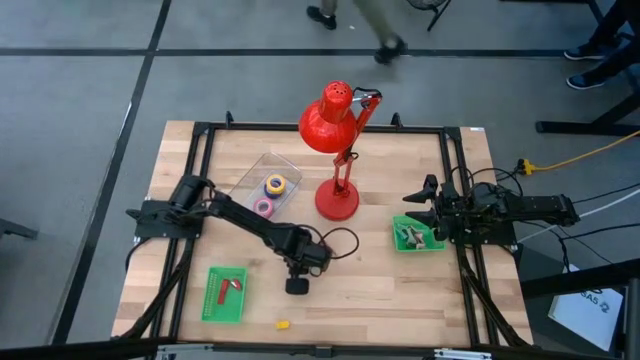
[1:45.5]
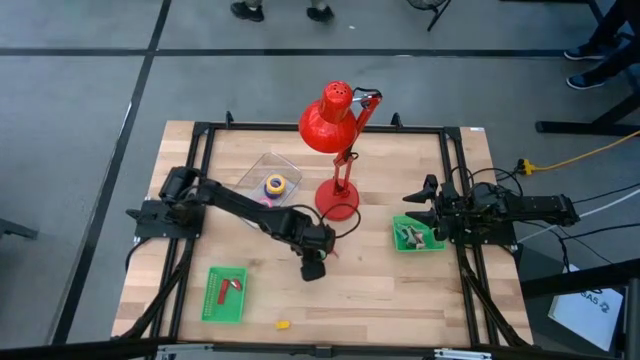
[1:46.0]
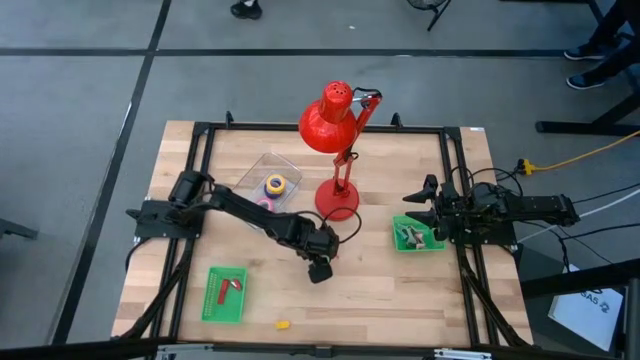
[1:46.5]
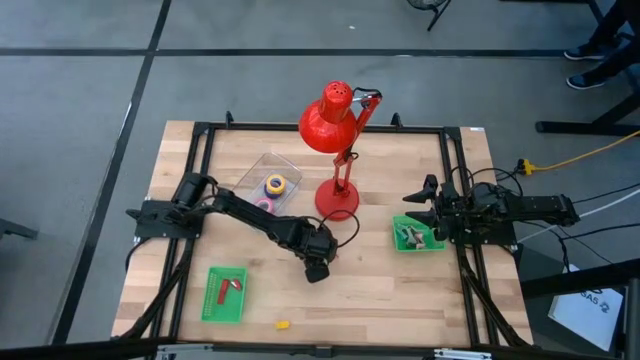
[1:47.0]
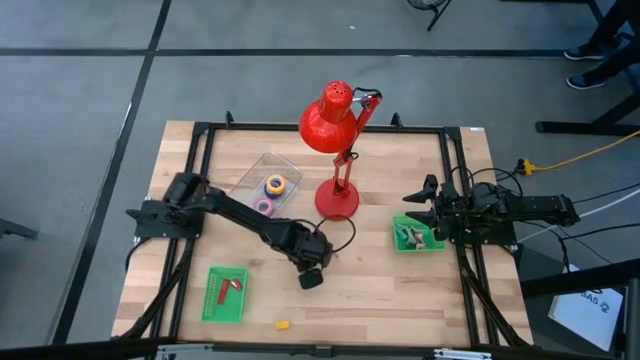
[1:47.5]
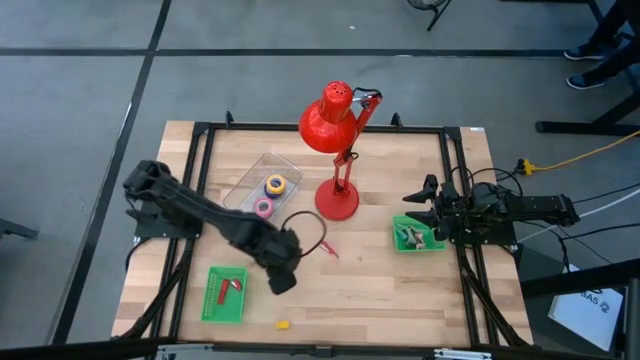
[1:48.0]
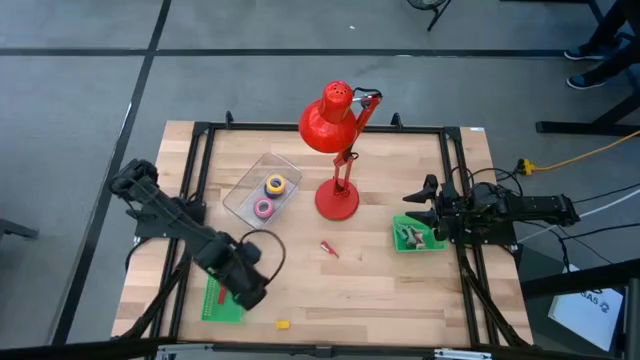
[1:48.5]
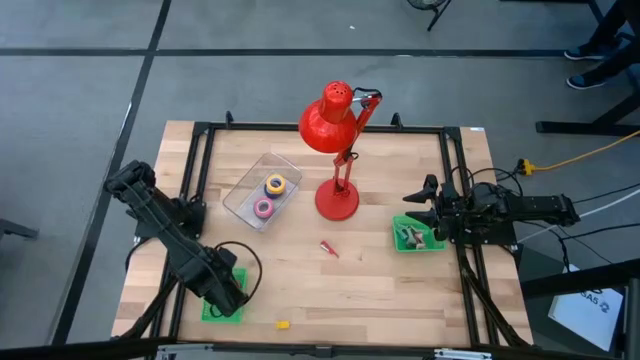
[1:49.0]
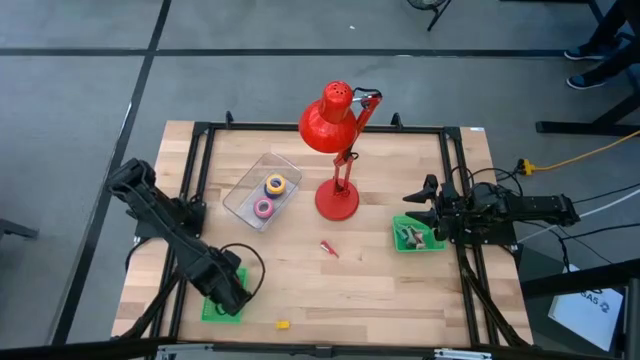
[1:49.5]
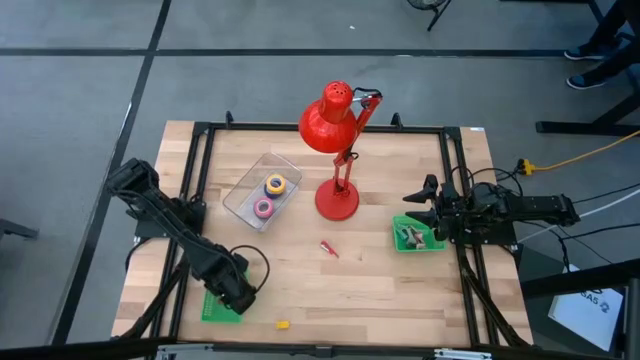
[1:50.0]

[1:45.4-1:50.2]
Task: Pick and place Stapler, Stapler remover, tape
Put the green stapler into the bottom green basket

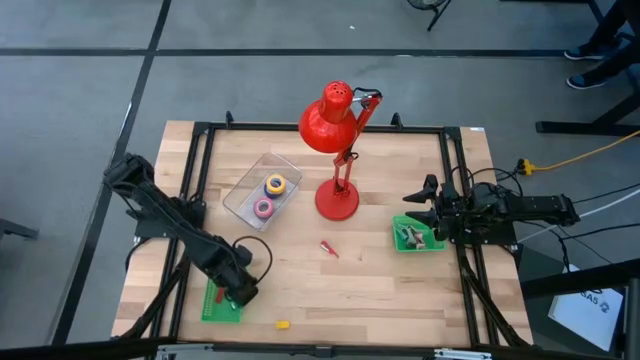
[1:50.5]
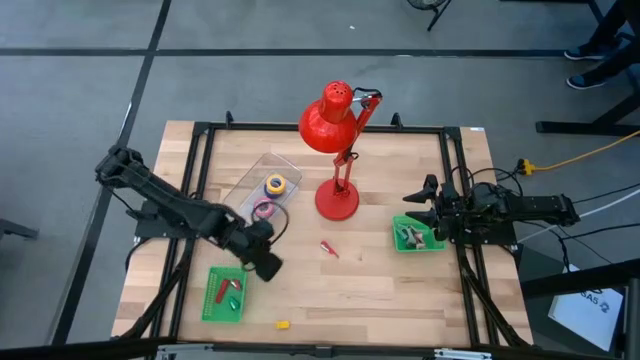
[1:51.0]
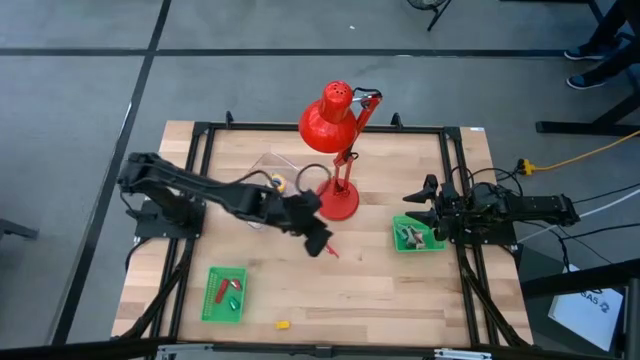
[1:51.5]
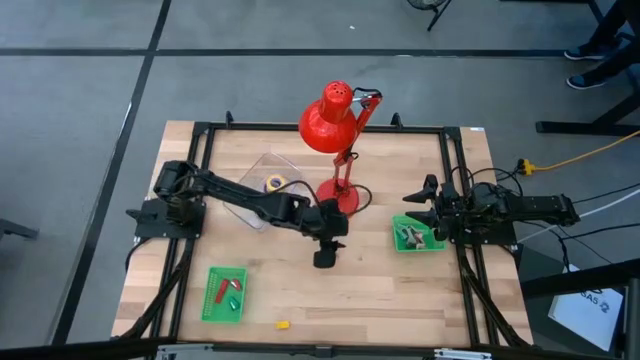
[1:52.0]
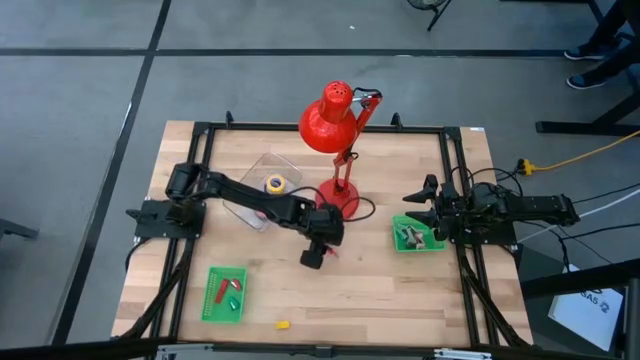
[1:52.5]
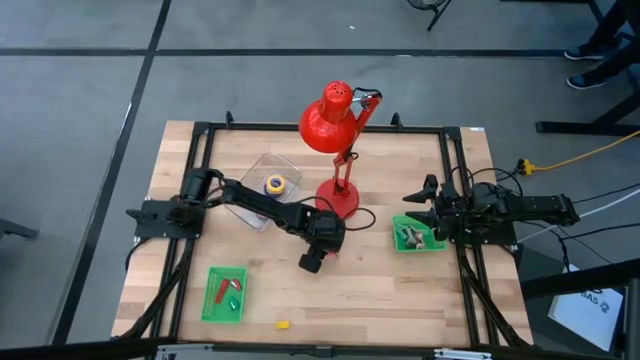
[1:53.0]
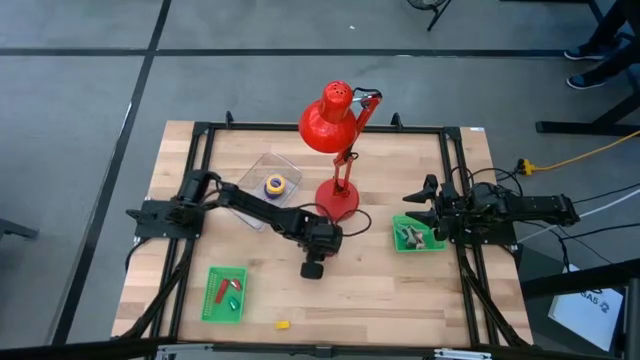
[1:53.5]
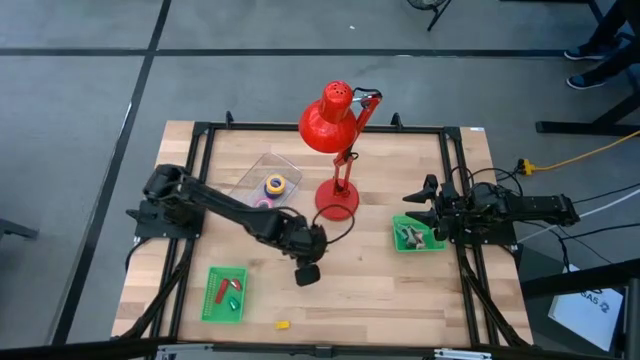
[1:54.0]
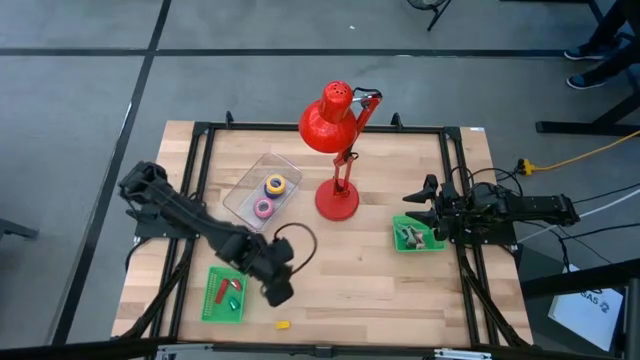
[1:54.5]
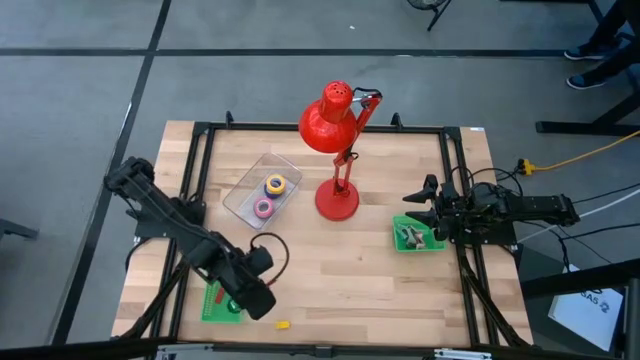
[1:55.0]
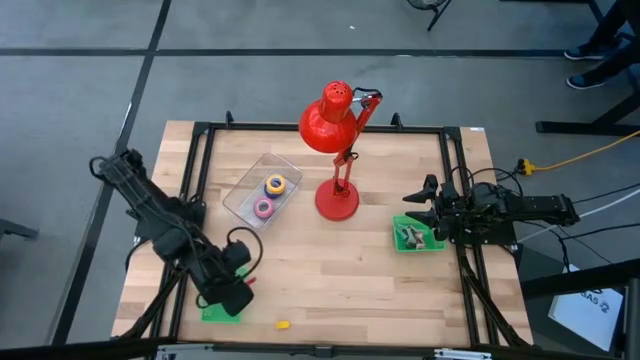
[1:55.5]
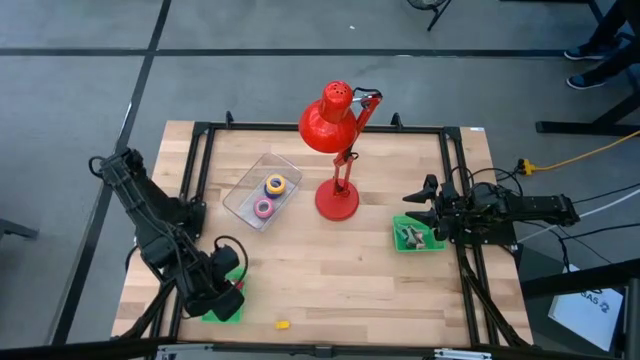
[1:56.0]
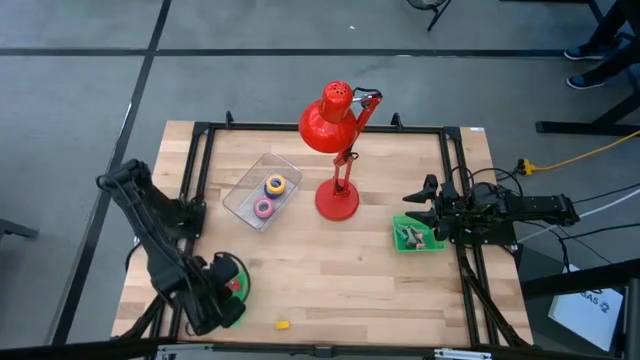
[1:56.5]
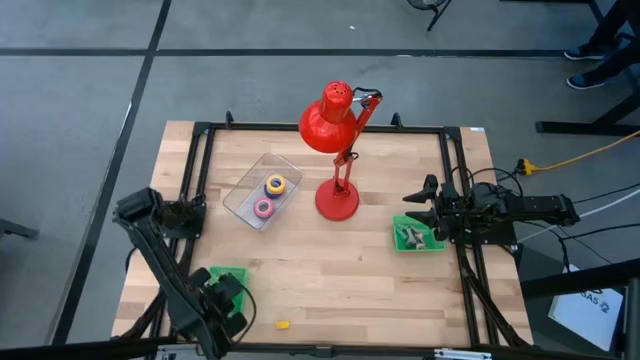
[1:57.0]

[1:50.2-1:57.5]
Put the red stapler into the bottom green basket

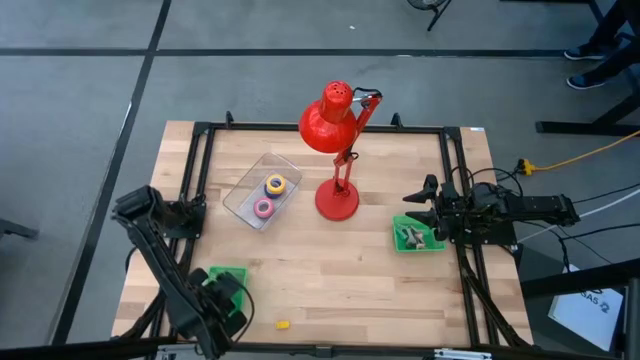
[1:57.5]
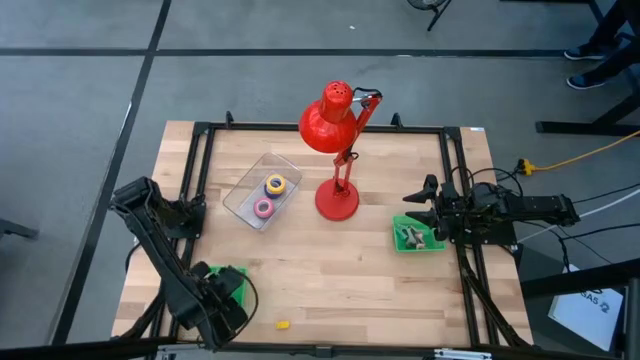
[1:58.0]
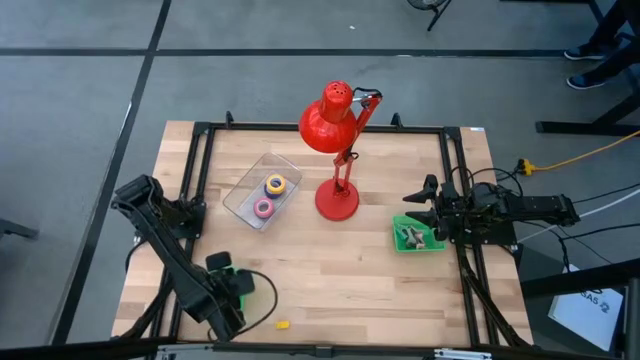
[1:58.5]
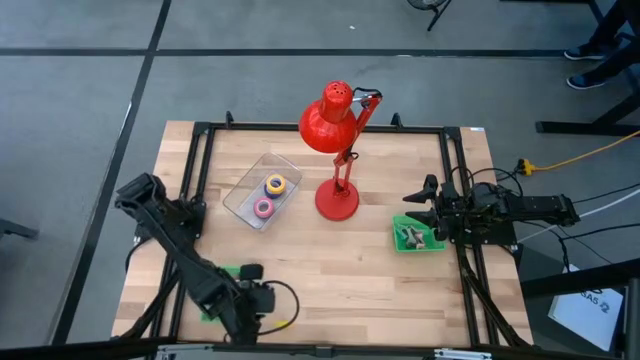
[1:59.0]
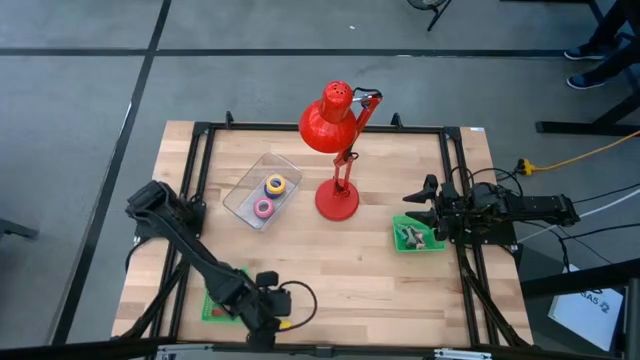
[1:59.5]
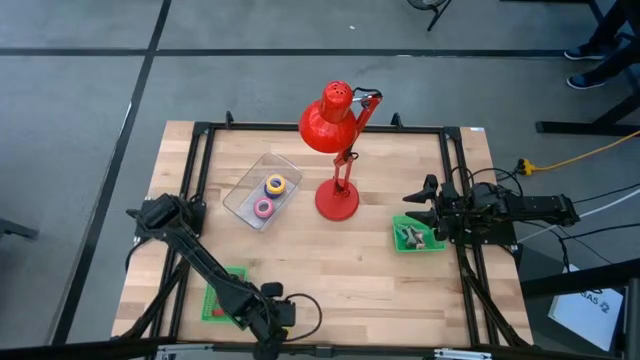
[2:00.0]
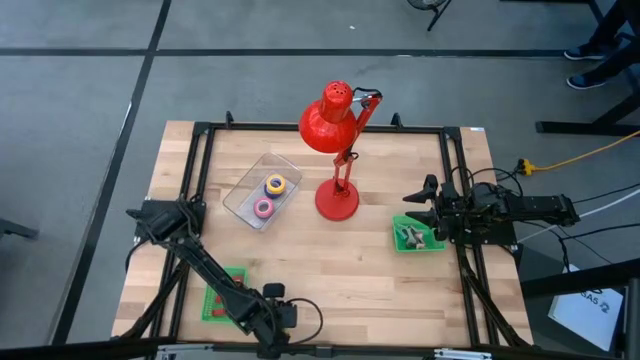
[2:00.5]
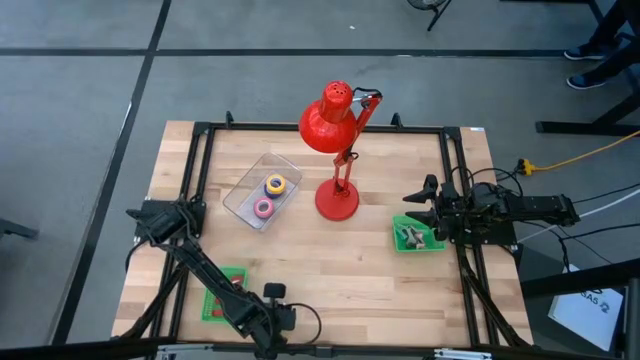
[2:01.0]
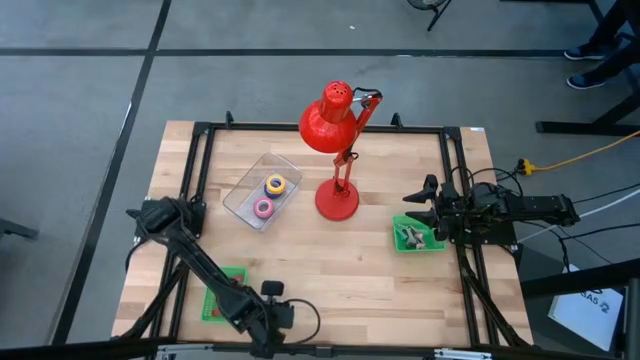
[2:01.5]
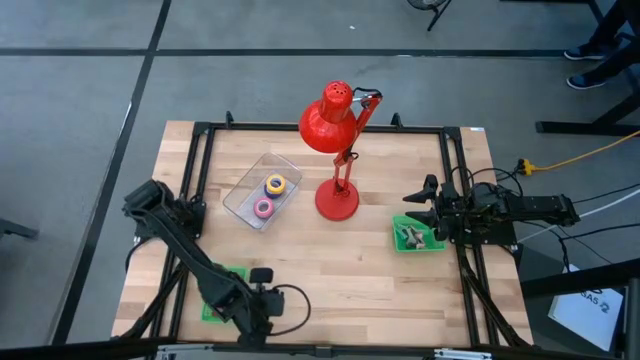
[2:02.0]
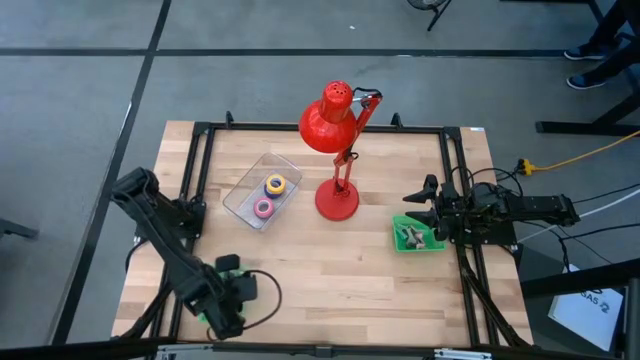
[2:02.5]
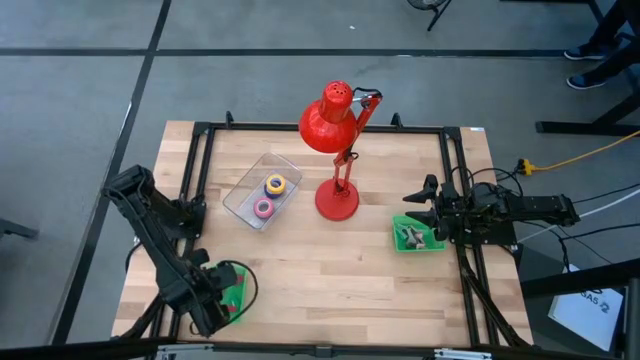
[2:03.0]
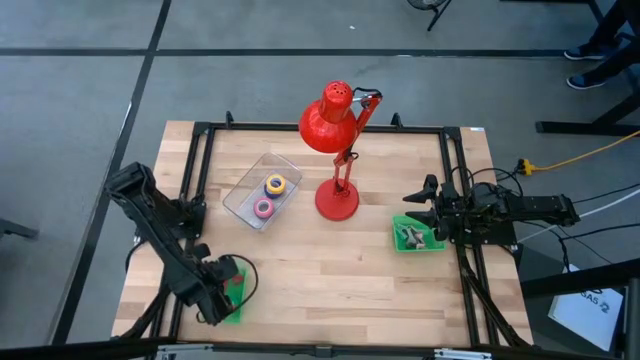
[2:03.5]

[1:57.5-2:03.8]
Put the yellow stapler into the bottom green basket

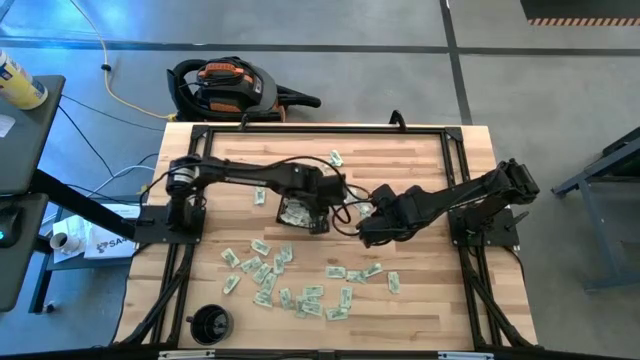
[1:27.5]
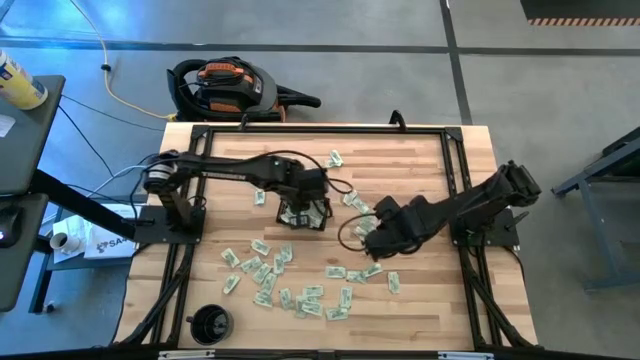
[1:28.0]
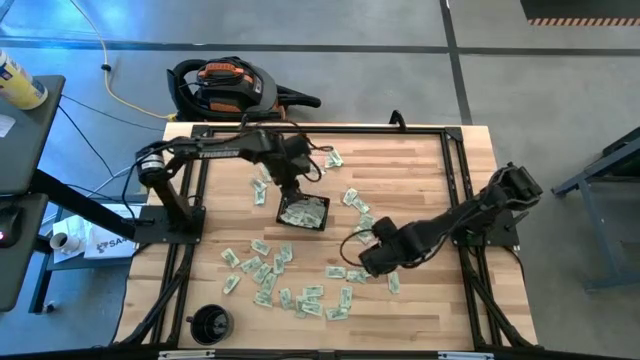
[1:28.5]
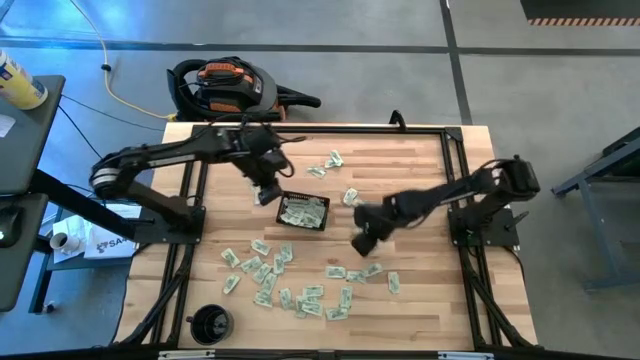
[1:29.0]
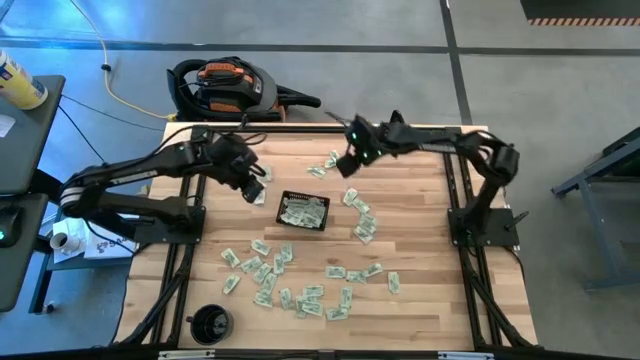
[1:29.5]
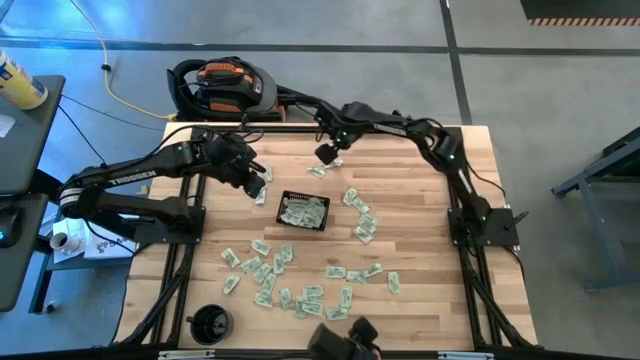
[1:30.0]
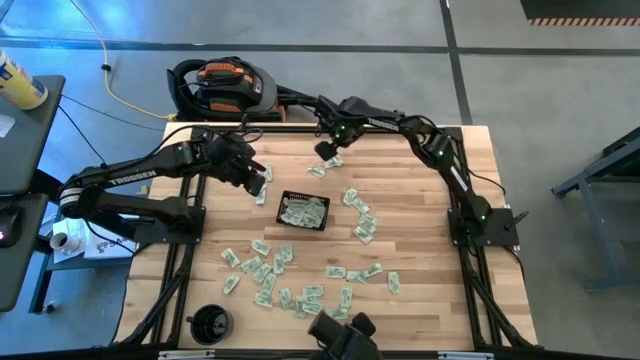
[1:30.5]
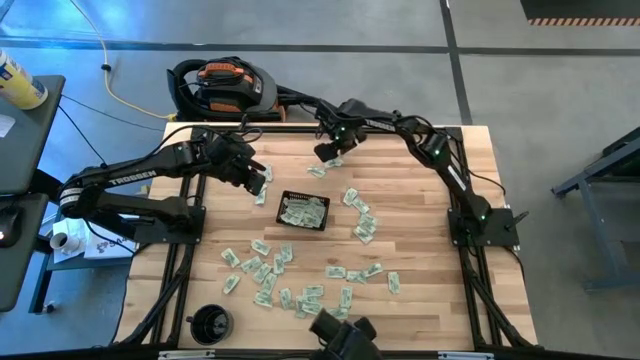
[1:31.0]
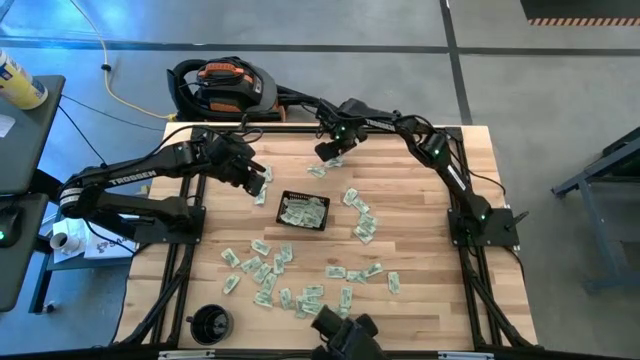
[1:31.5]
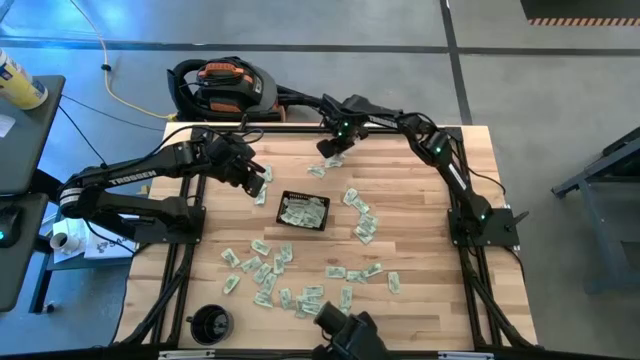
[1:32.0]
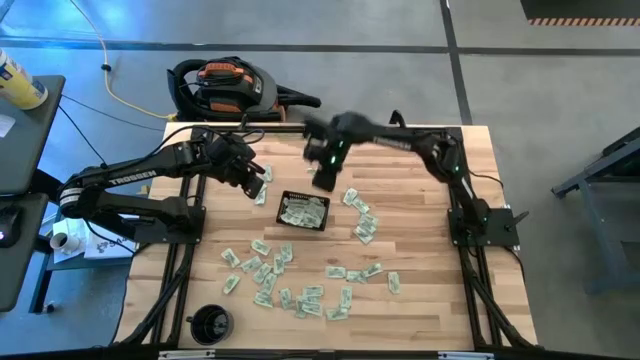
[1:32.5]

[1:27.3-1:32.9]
Task: Pick and place Stevia / Truvia into bins
Put the green stevia packet into the black basket
